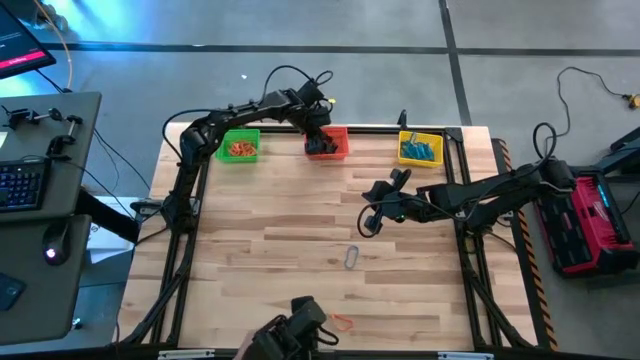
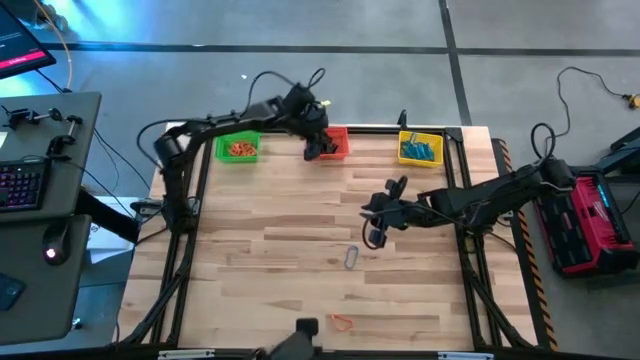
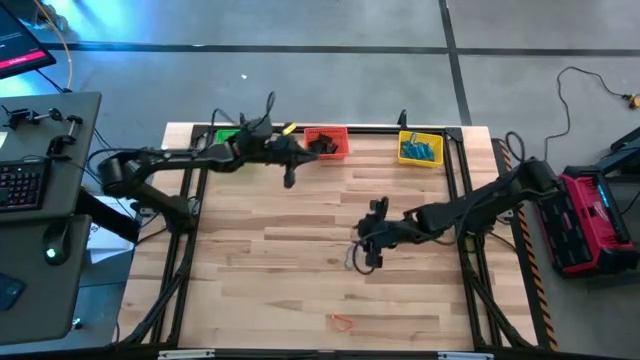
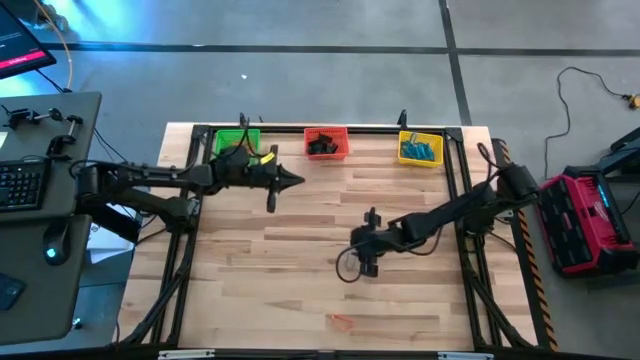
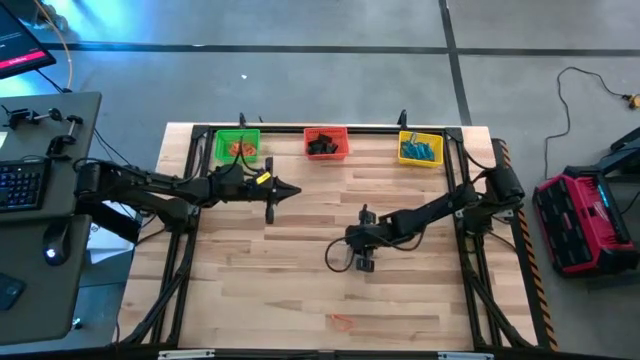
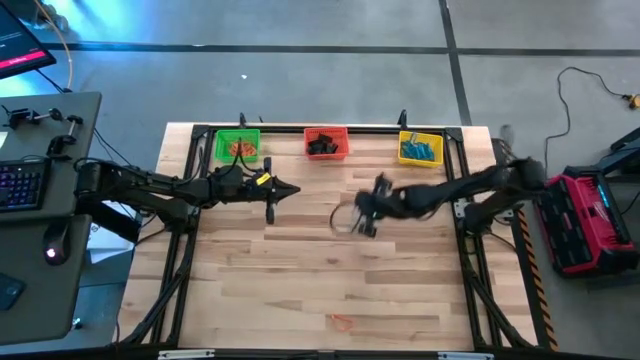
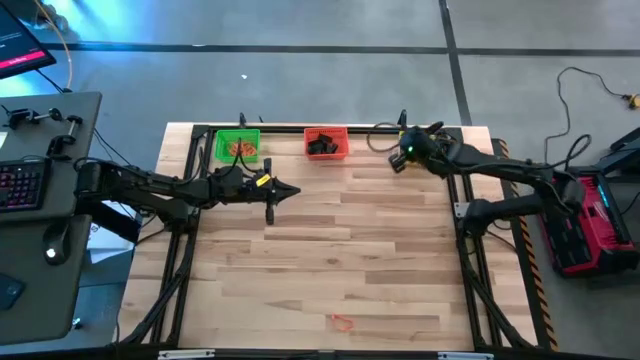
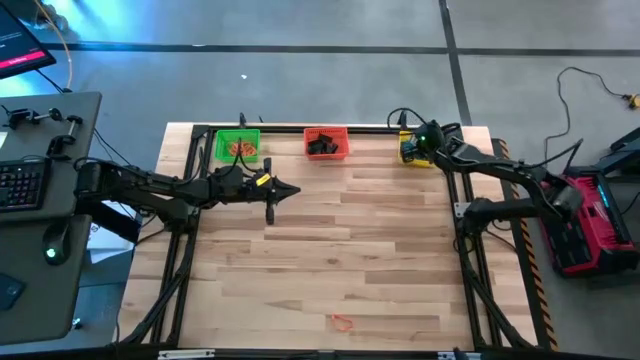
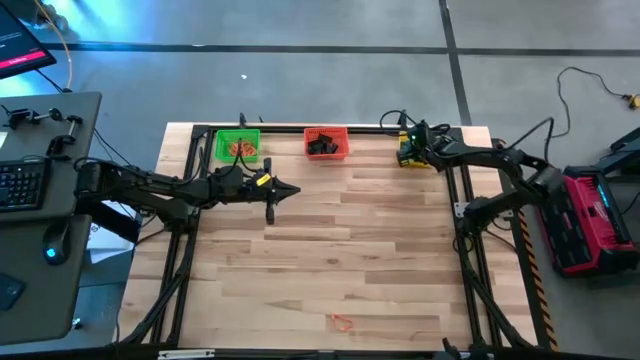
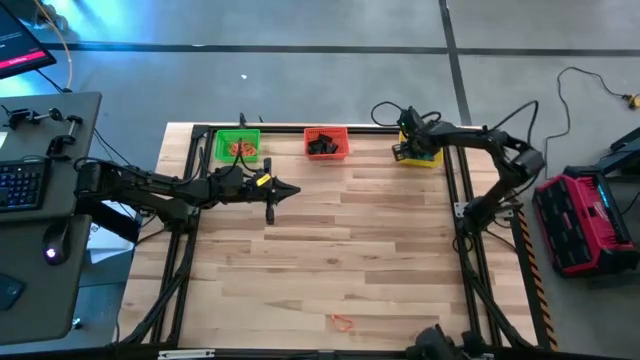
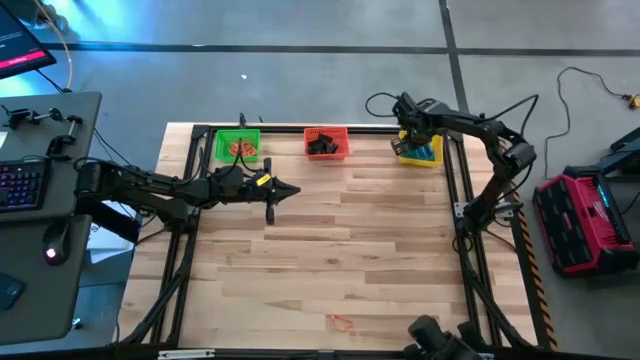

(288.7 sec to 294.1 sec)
Task: Sort rubber bands into baskets
Put the blue rubber band into the yellow bin

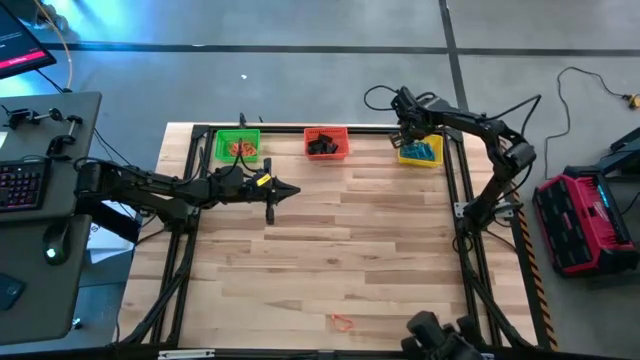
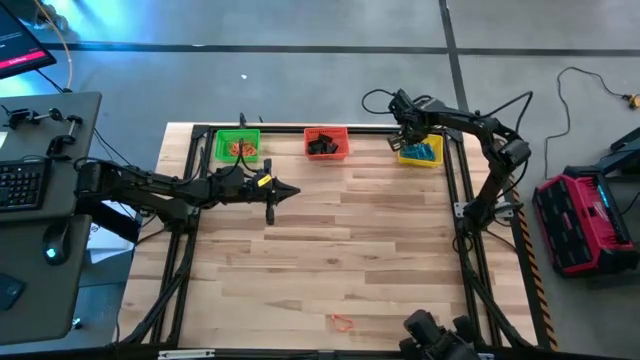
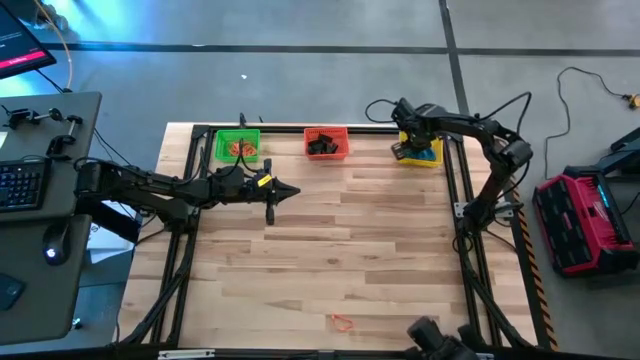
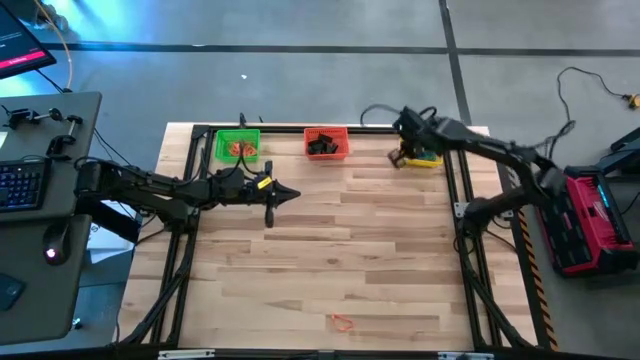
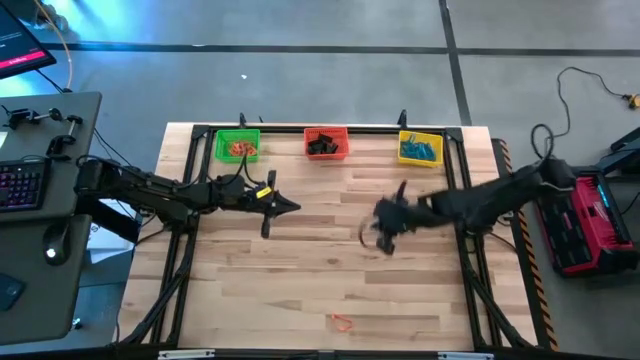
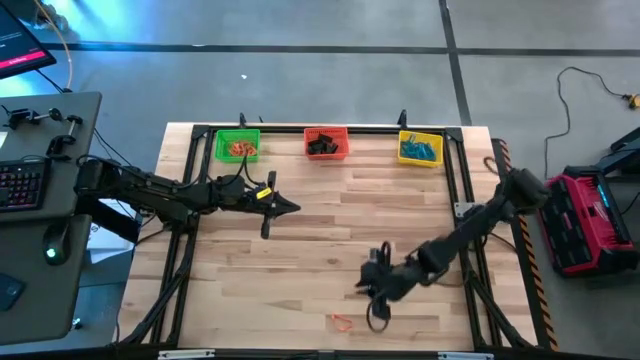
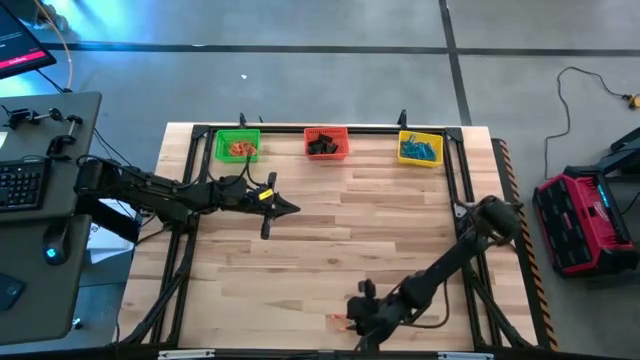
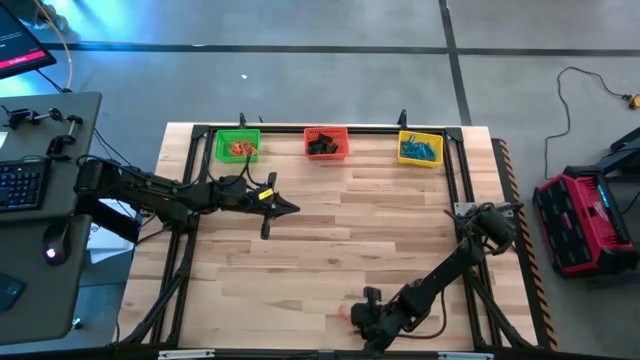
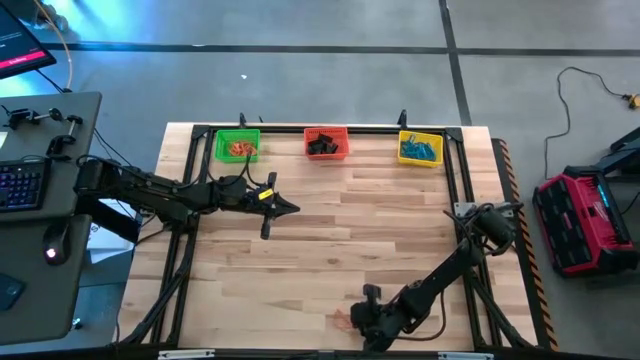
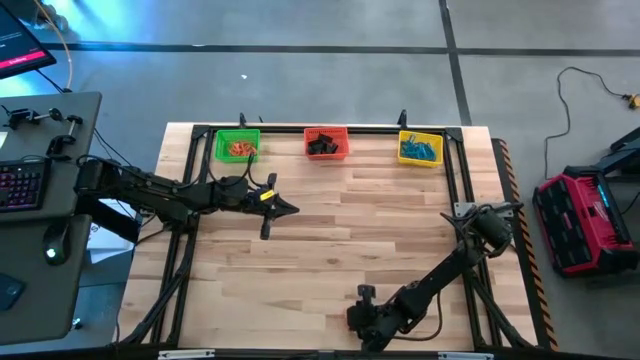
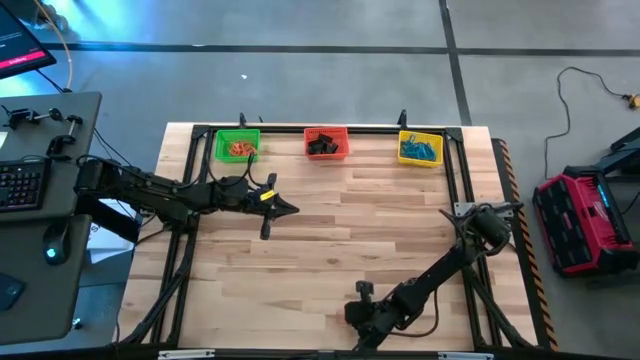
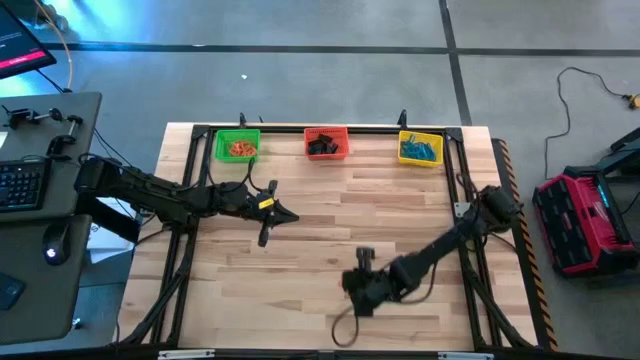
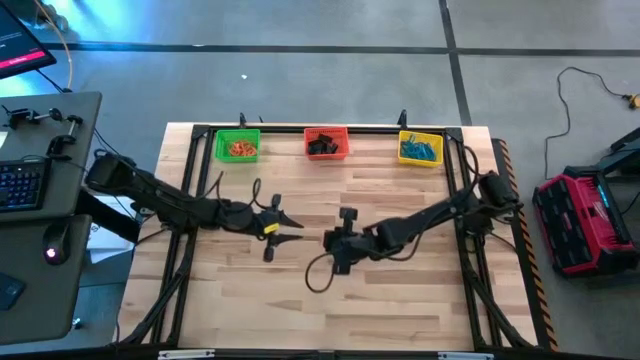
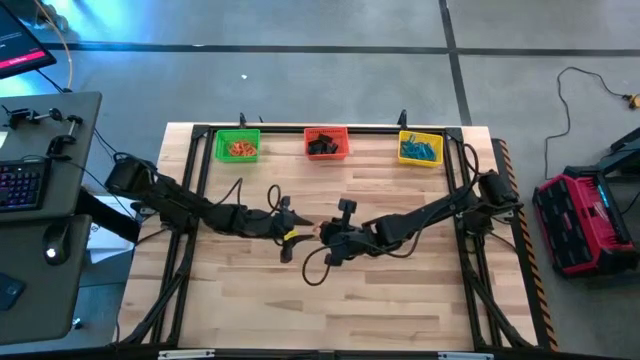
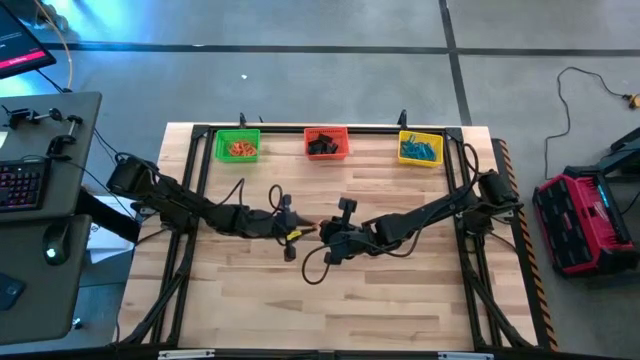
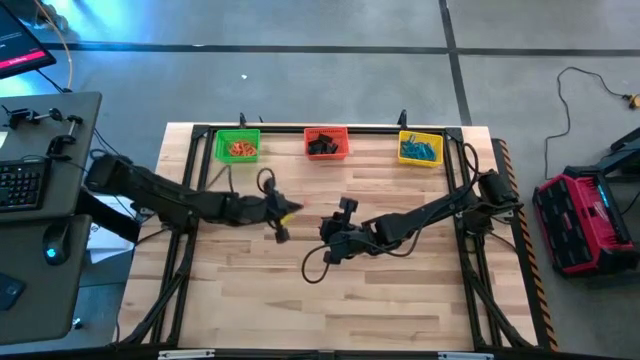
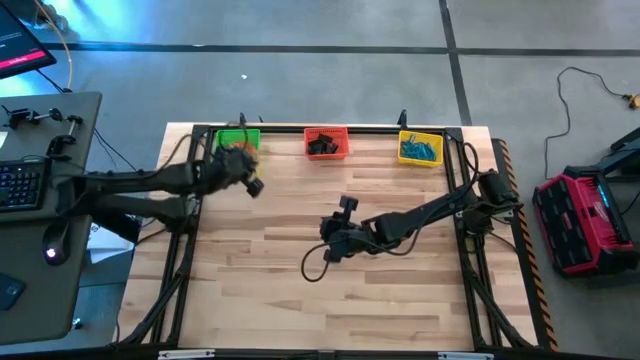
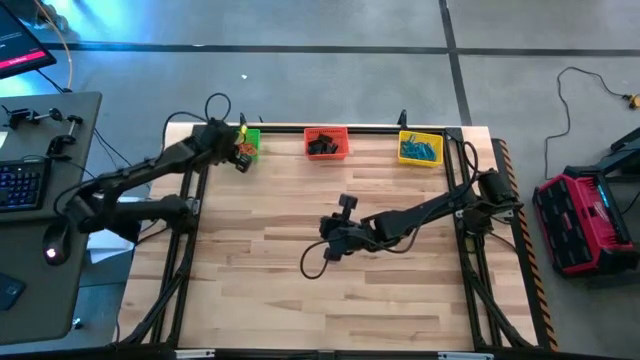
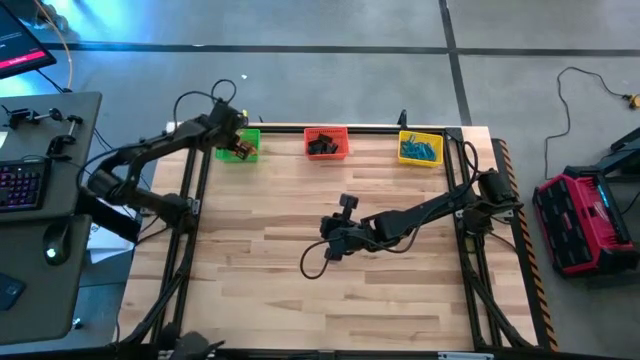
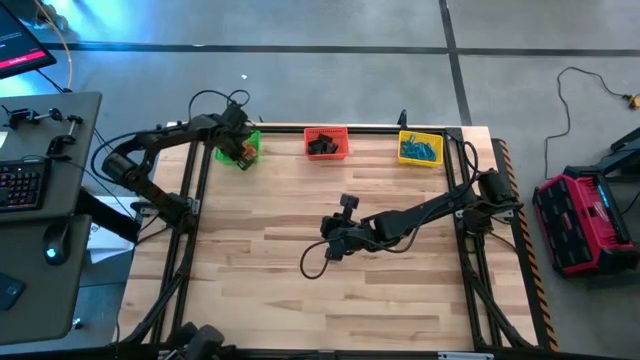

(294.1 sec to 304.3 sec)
Put the orange rubber band into the green bin

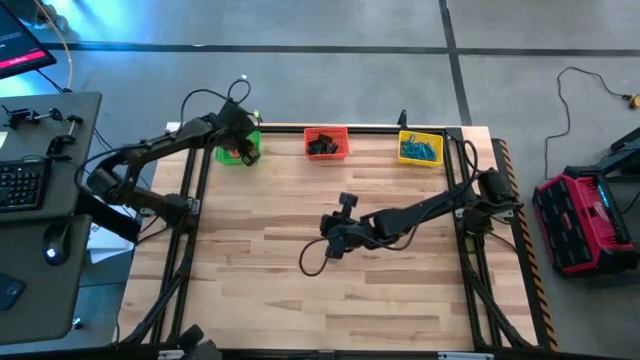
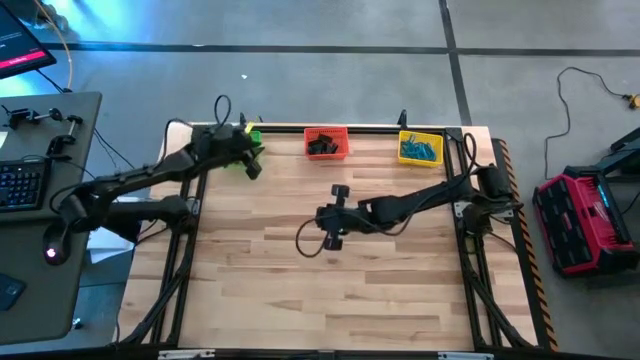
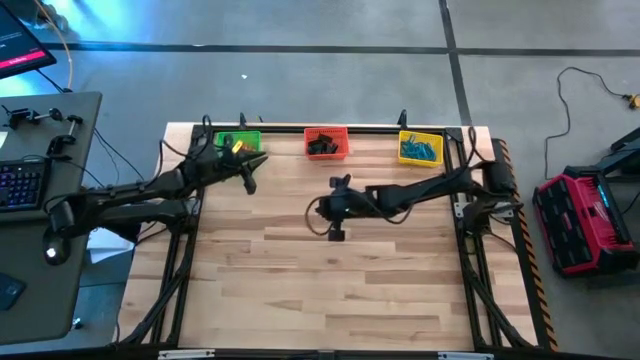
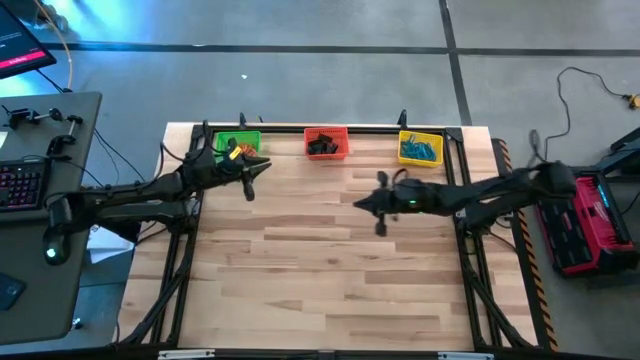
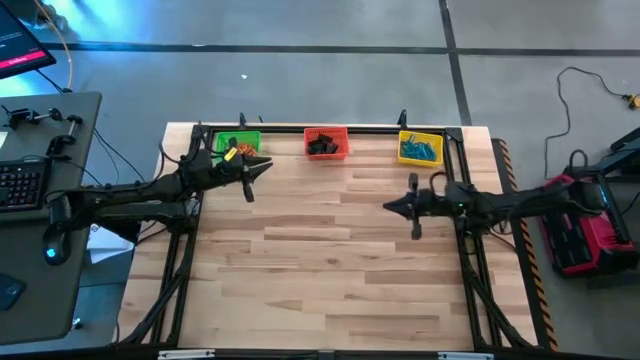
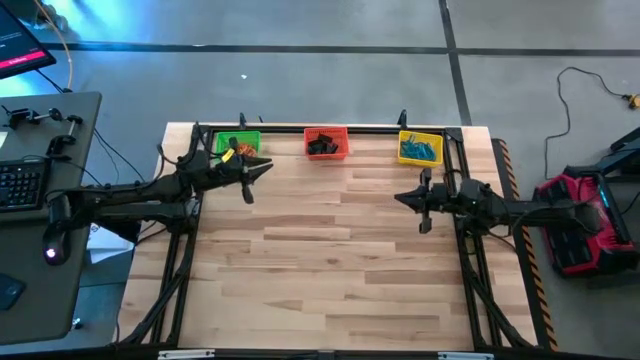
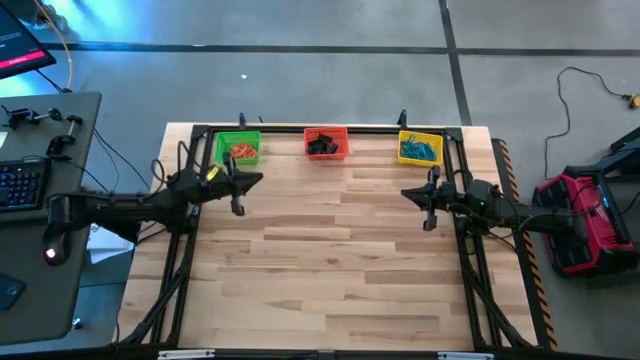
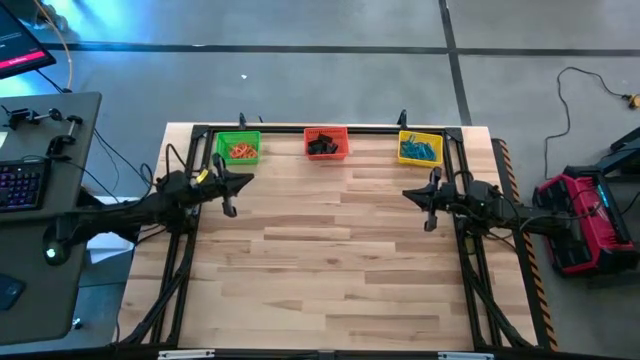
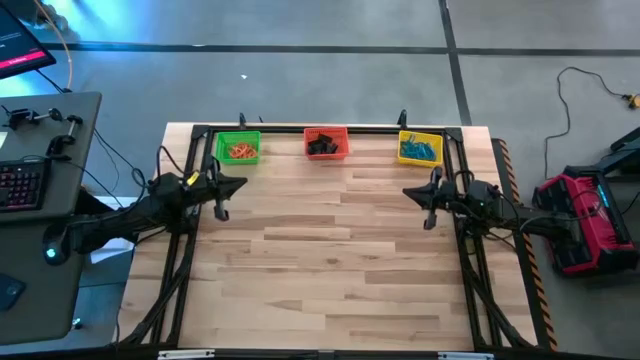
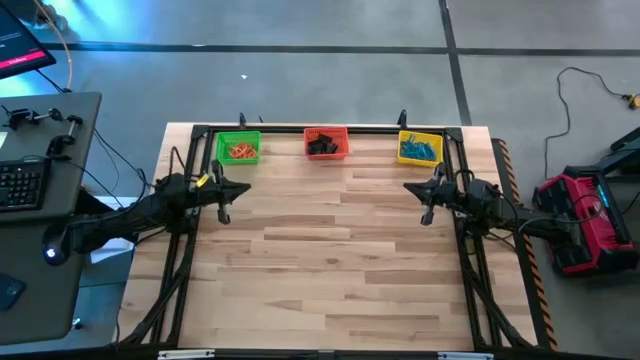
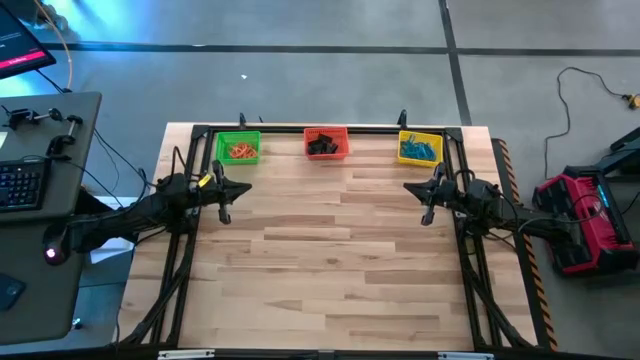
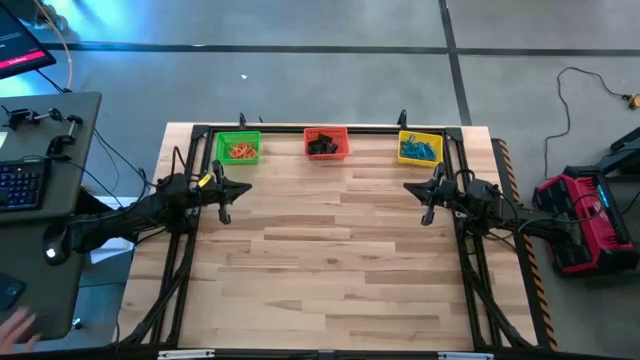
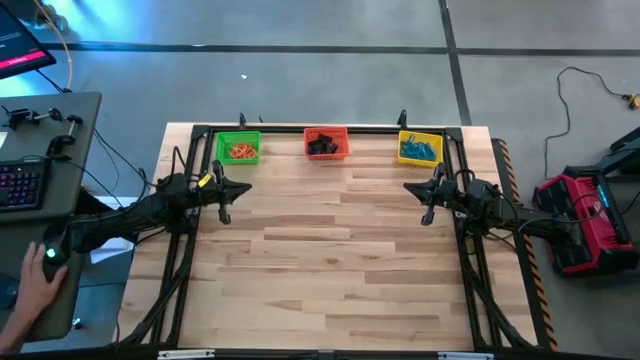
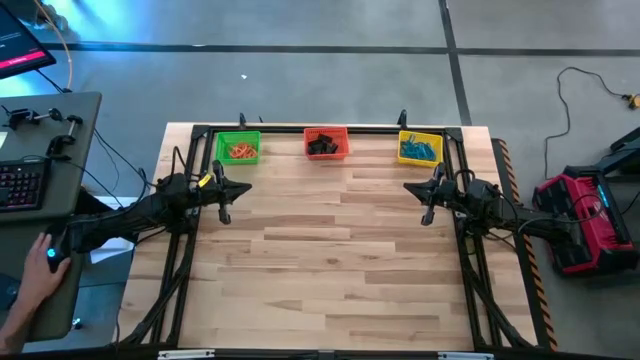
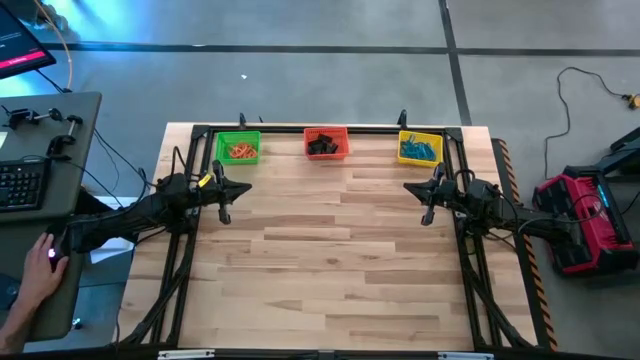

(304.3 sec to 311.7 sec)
Return to Home Position
